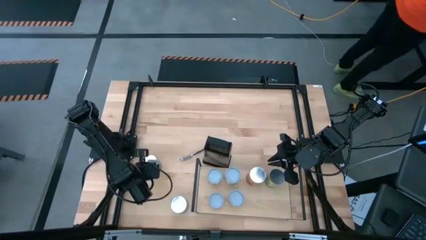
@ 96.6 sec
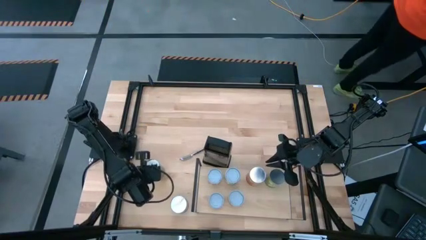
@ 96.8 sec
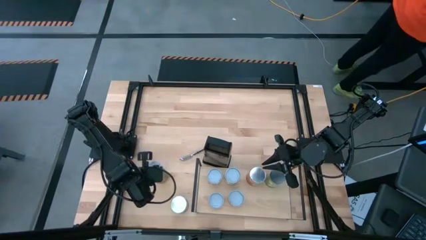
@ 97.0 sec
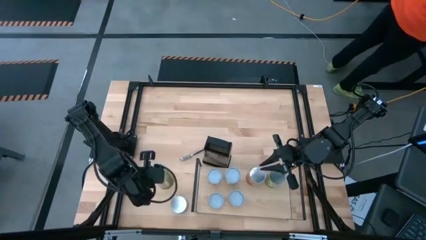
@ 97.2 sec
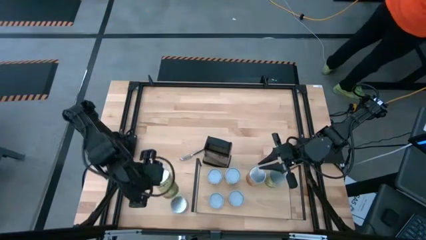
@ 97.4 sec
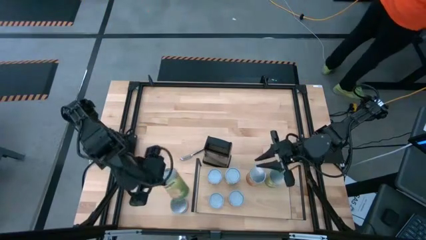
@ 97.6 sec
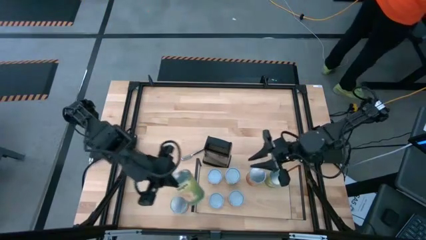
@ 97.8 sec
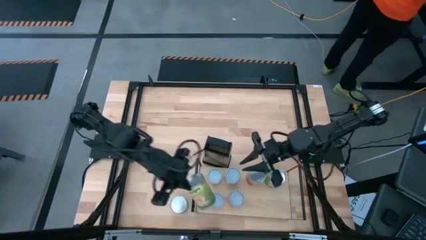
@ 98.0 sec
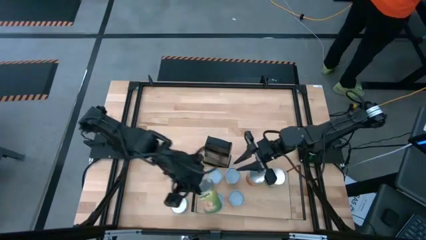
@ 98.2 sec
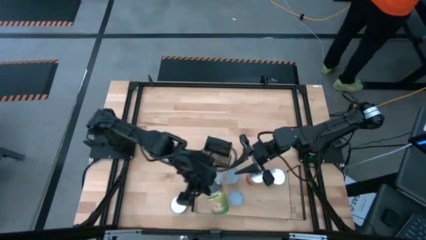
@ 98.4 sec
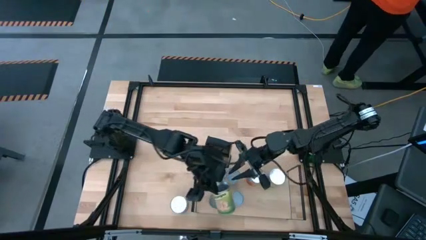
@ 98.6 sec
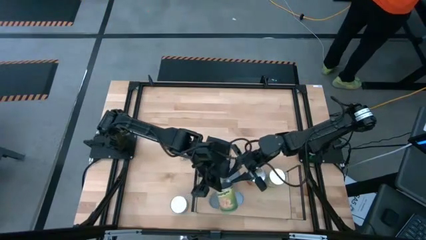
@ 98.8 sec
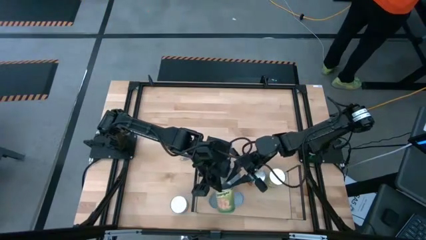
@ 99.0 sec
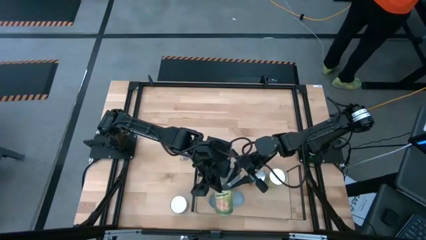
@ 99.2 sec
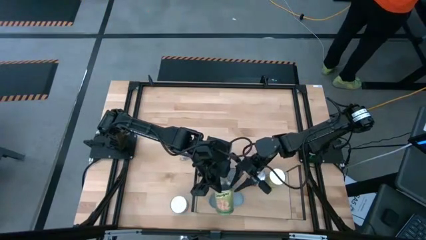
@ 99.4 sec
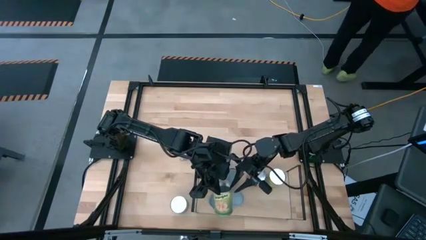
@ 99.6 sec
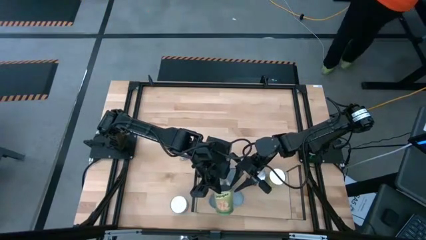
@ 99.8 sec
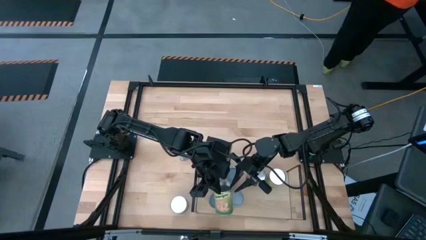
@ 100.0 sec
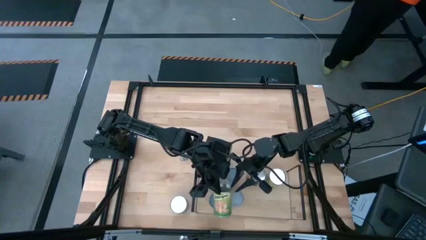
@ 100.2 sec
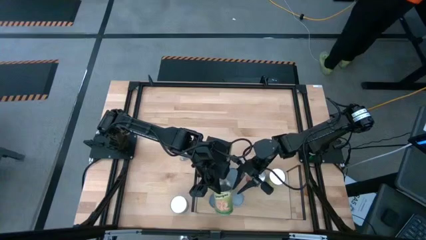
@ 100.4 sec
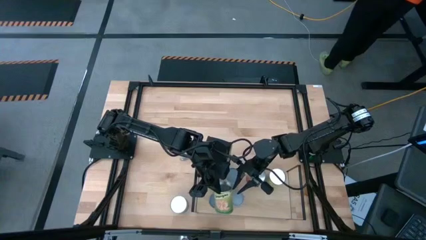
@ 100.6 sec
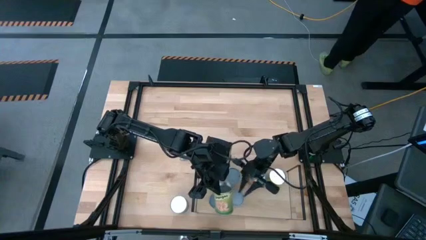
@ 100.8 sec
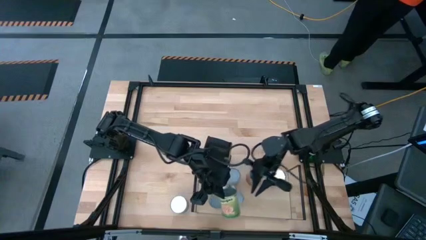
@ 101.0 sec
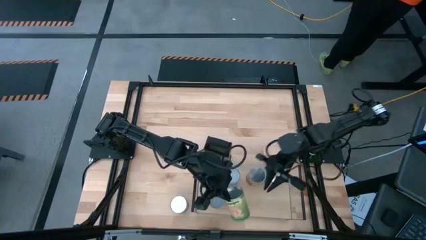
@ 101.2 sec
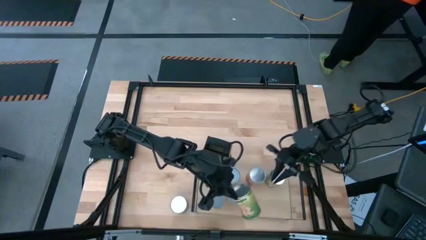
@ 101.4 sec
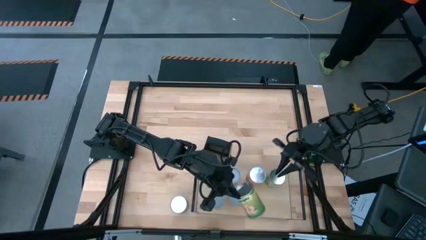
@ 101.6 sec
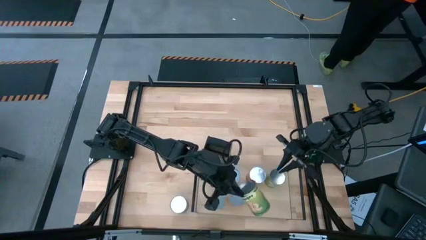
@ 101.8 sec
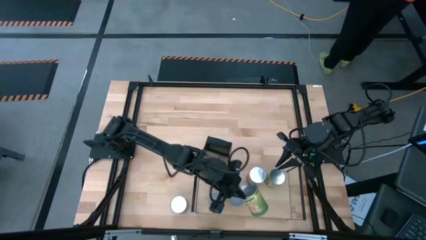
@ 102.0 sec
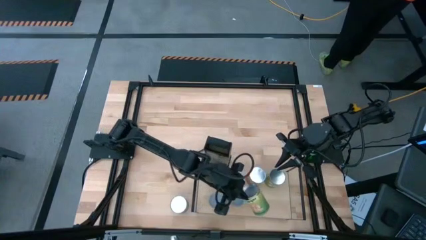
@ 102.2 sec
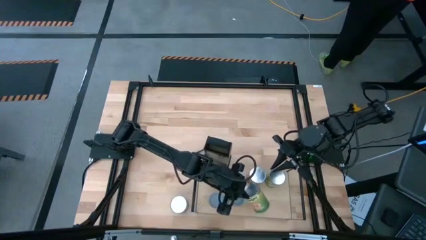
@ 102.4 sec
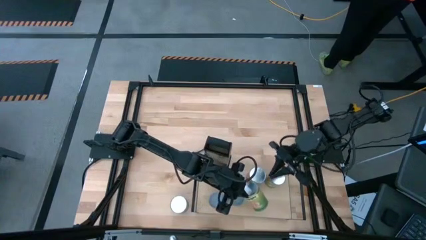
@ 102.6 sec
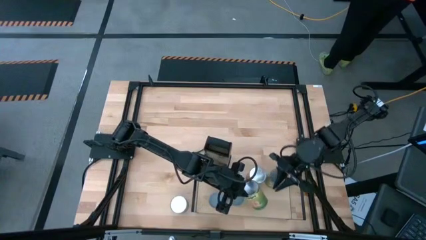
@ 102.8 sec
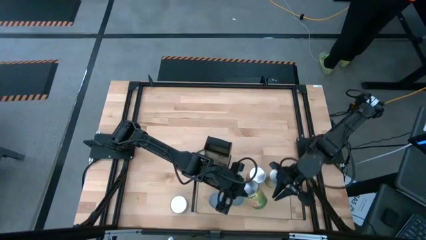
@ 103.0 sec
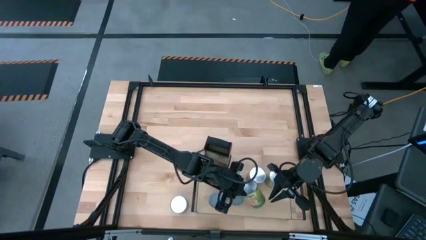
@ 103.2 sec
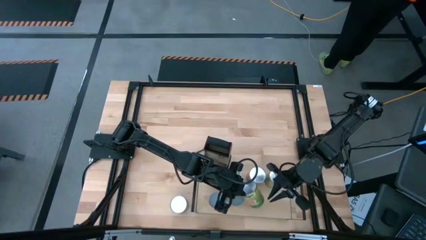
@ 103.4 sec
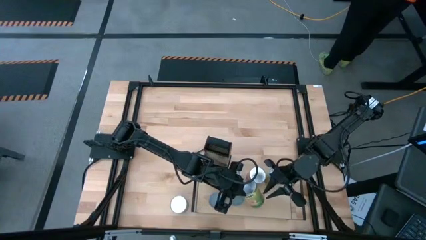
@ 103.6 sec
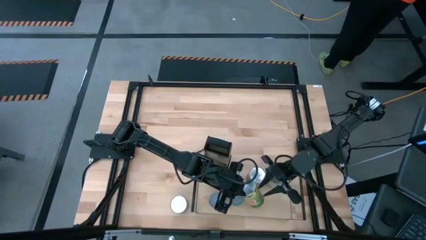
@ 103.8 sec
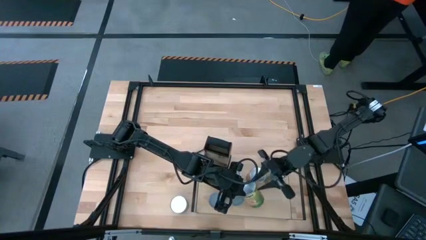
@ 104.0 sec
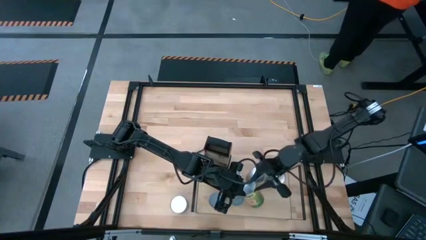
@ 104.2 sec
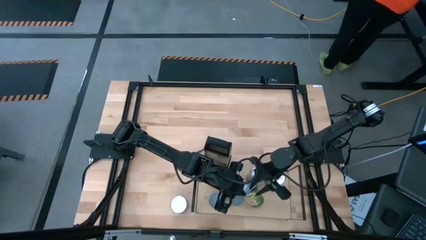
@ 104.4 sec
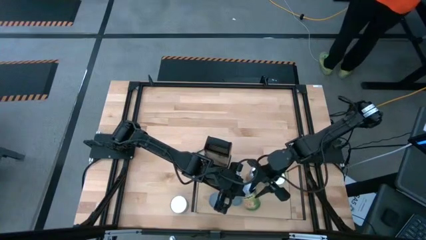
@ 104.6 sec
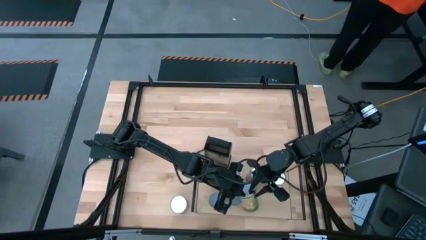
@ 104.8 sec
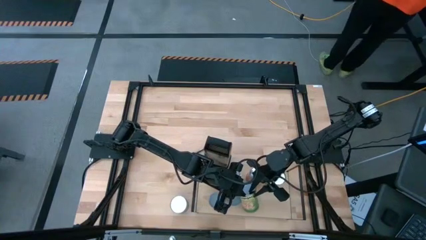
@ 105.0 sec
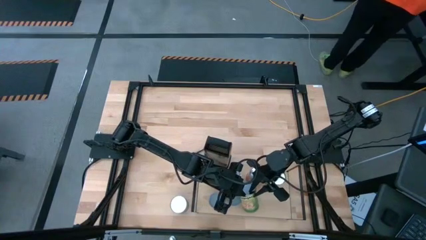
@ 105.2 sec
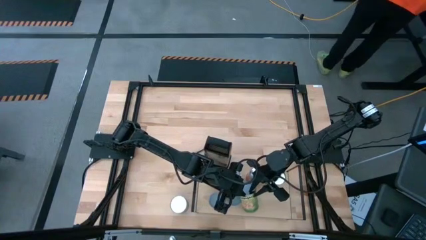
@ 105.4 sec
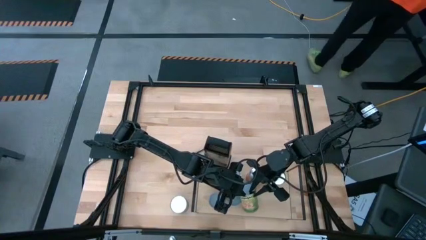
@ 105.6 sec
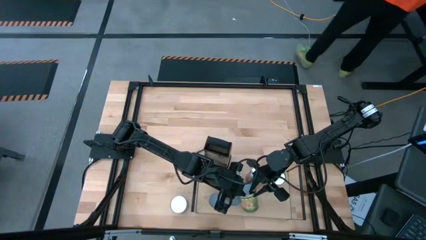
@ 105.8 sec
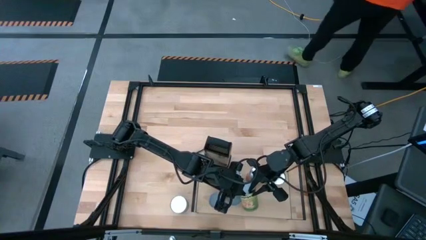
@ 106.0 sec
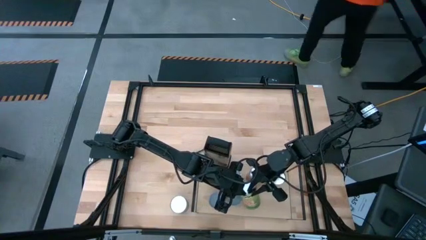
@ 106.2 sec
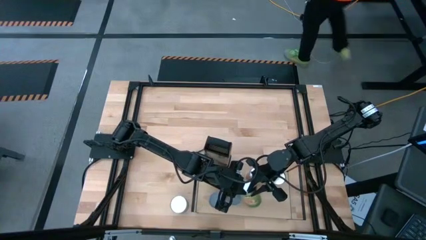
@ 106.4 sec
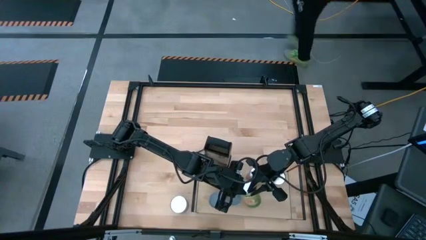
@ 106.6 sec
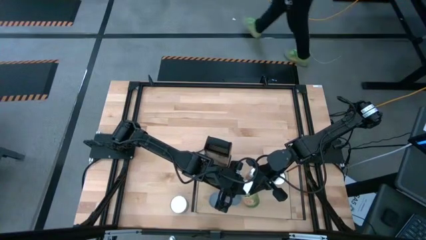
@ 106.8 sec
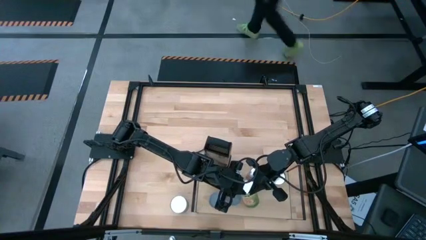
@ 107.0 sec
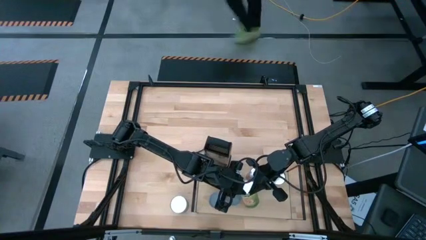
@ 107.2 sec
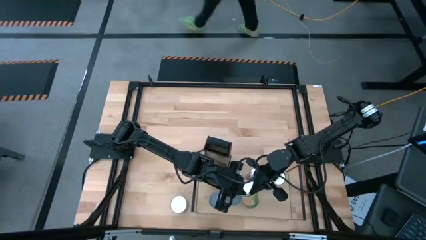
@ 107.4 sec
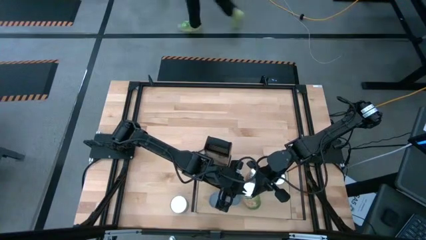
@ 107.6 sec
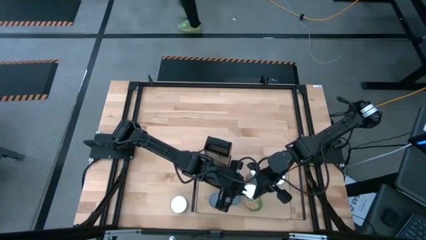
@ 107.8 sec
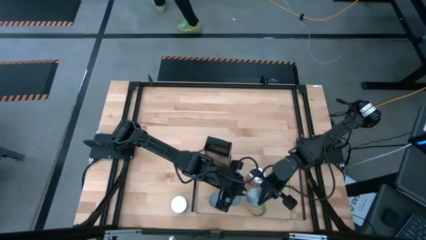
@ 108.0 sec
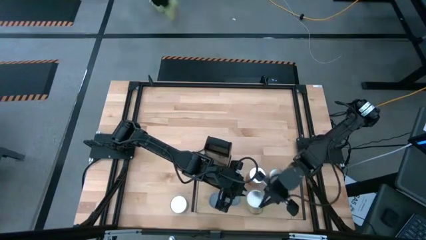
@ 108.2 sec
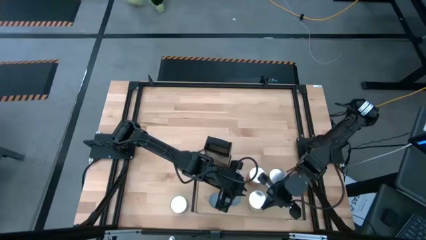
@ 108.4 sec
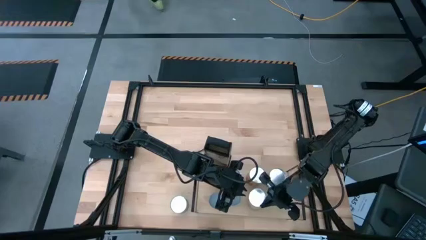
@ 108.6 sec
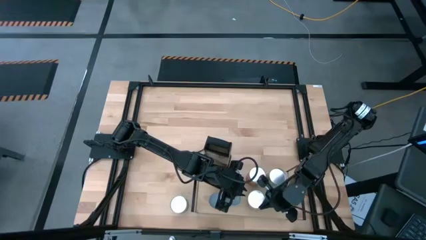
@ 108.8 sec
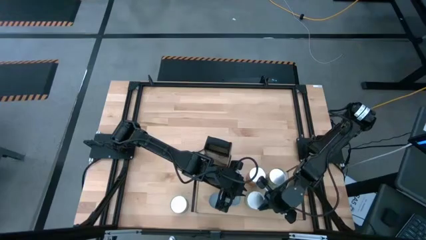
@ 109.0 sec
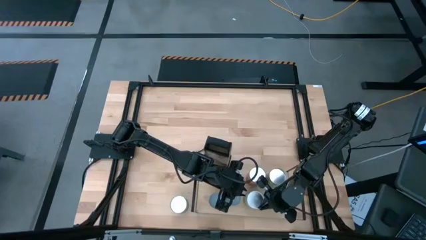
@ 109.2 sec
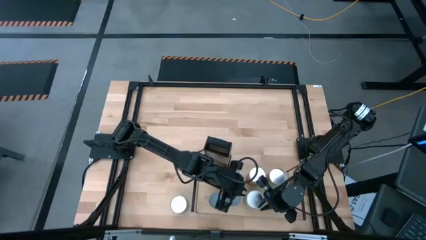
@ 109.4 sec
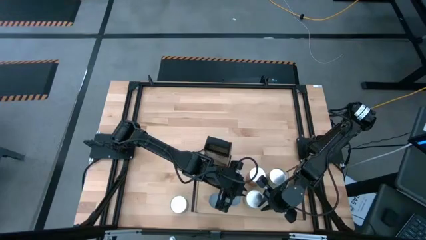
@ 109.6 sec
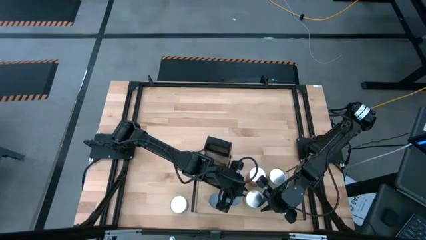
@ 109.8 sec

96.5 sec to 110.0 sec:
Task: Pick and place cans onto a shelf
Put the canned oranges on the shelf

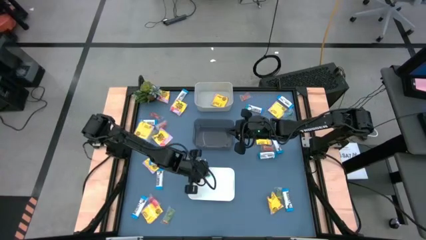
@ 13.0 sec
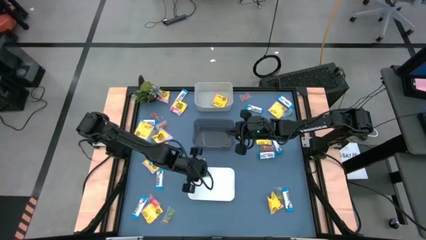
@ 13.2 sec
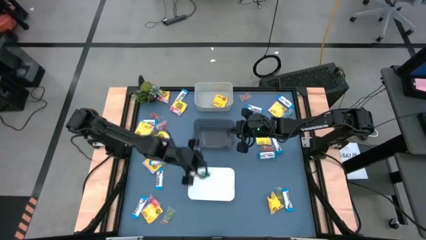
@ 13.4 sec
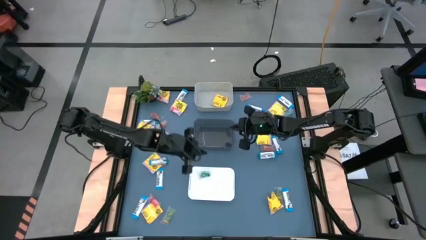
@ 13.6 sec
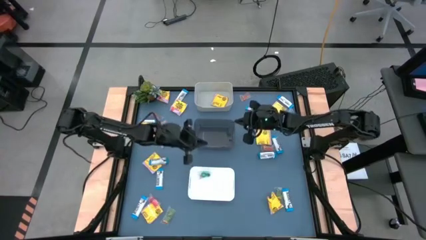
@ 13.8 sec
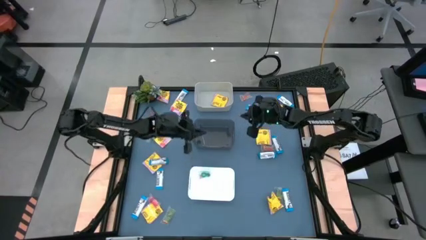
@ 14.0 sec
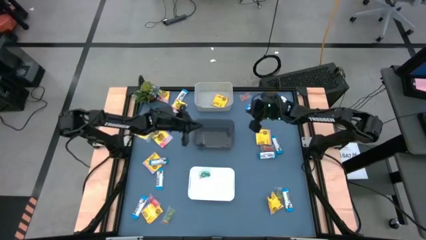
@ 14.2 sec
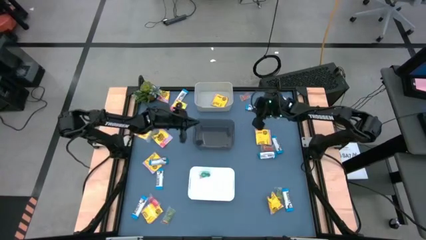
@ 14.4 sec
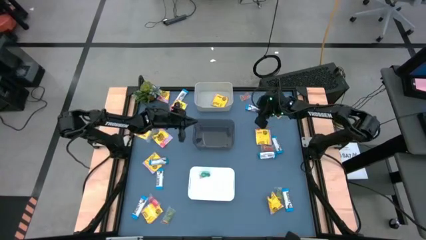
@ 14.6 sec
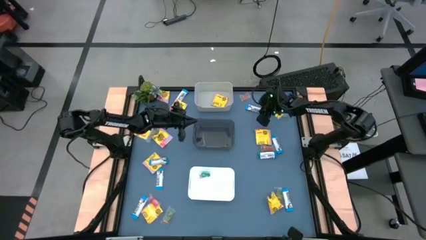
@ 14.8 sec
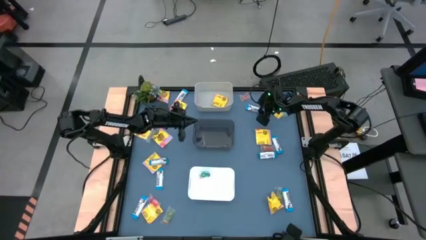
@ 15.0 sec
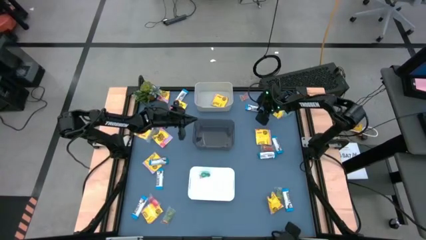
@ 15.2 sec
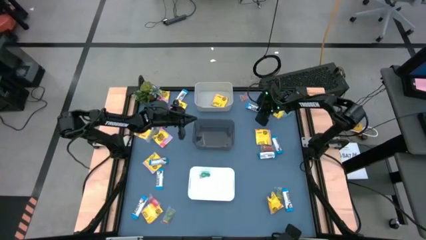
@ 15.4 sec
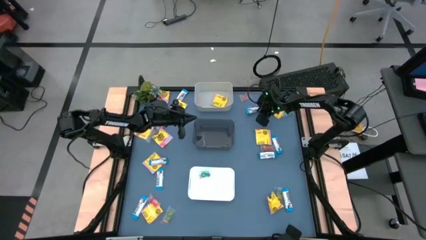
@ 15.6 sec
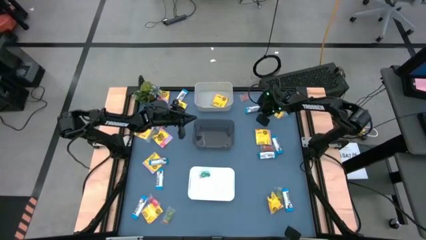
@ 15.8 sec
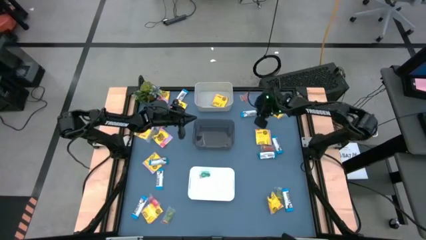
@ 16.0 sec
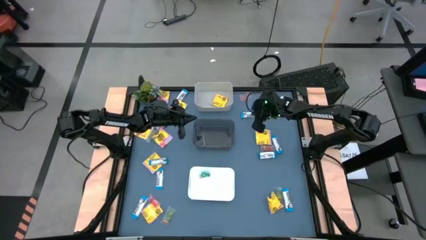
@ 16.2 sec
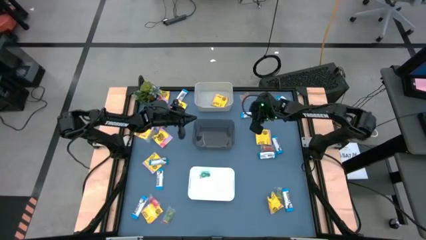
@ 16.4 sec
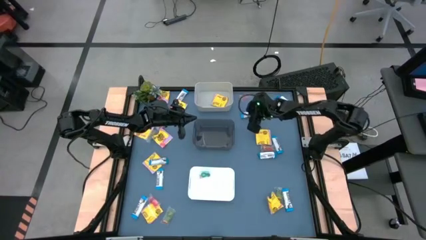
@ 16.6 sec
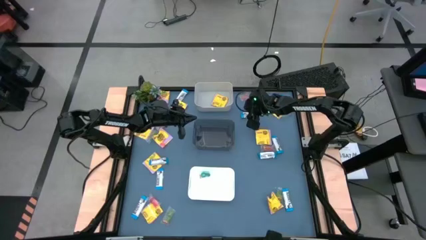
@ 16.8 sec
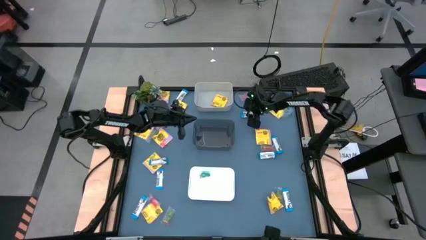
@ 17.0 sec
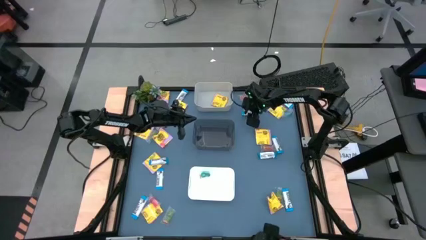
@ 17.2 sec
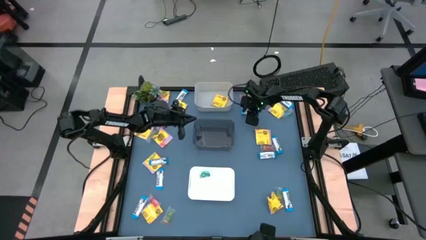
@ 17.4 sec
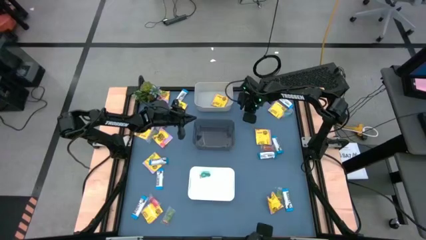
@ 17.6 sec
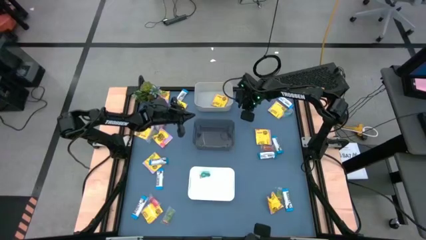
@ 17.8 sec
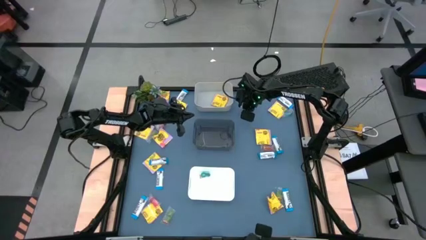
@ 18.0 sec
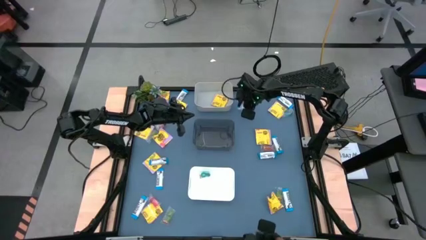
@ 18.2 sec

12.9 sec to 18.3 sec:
Task: Sort candy
Put the white chocolate bar into the gray bin
